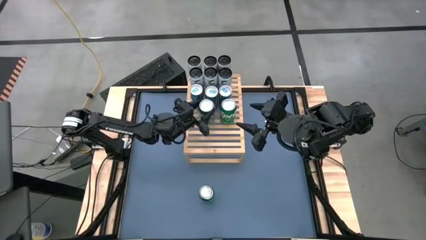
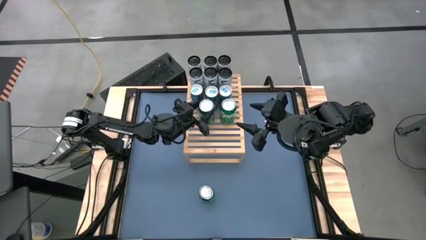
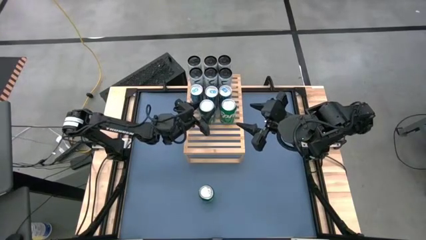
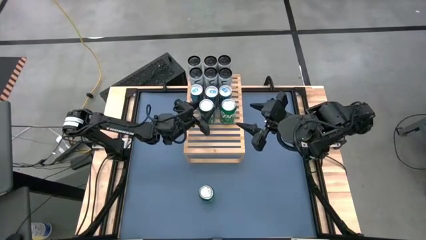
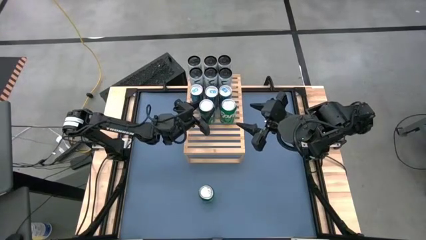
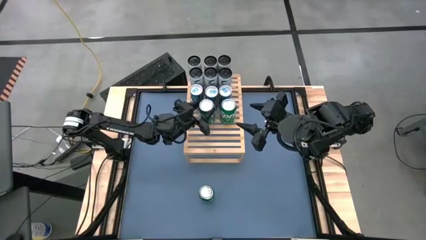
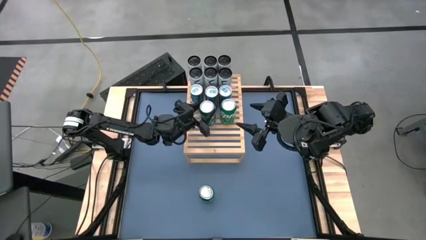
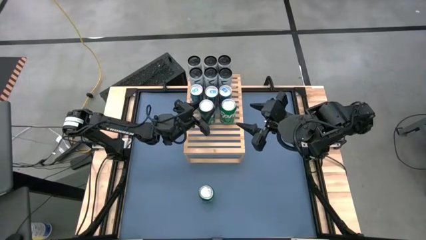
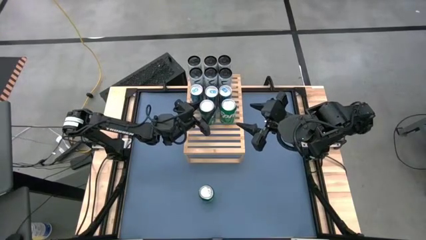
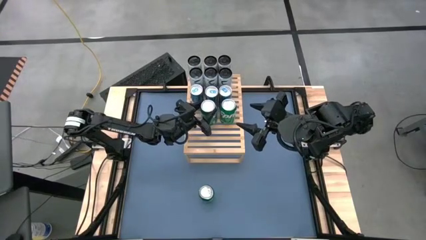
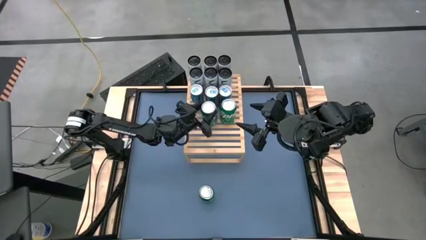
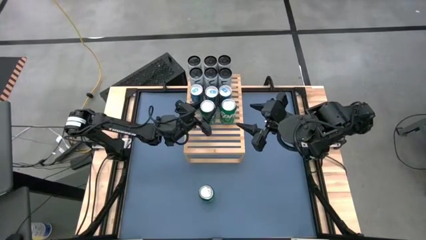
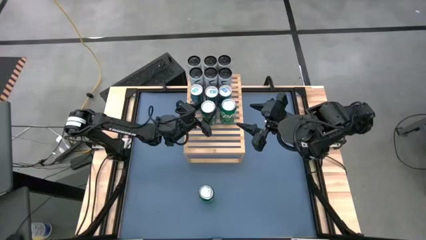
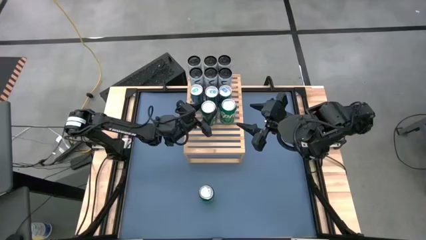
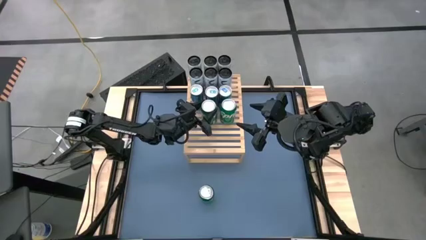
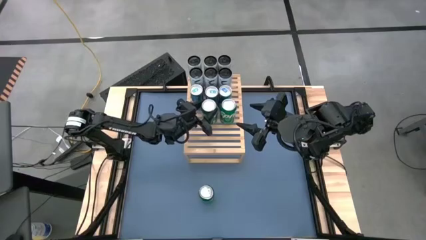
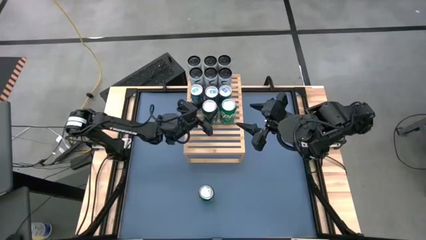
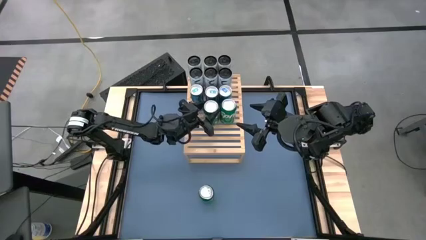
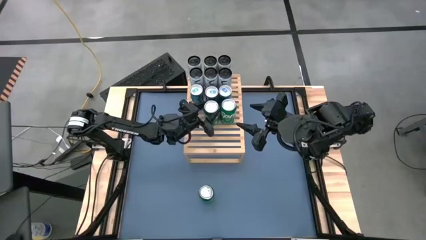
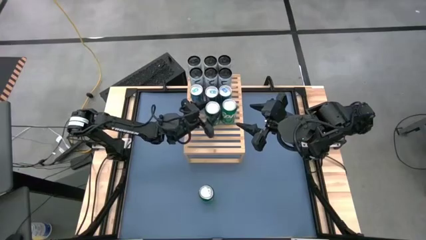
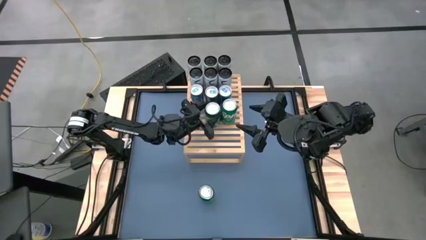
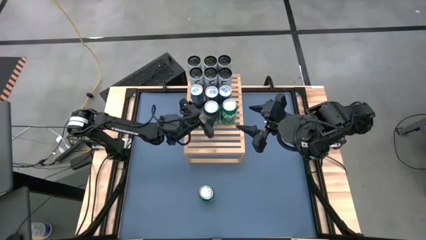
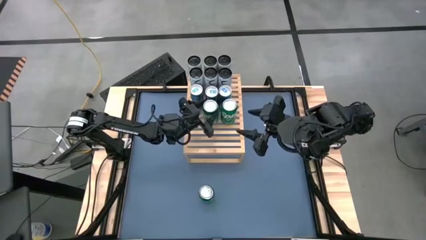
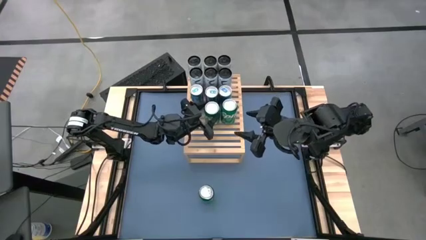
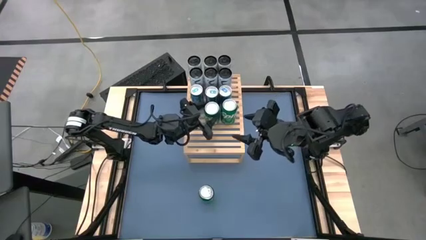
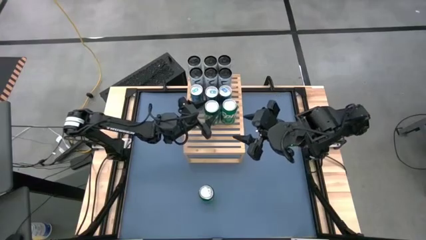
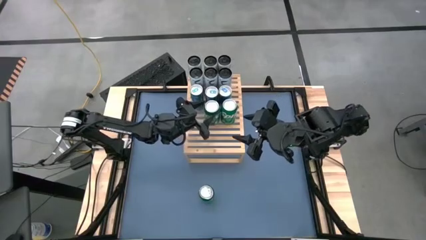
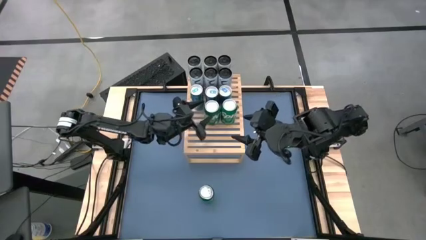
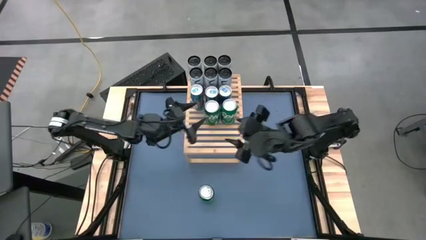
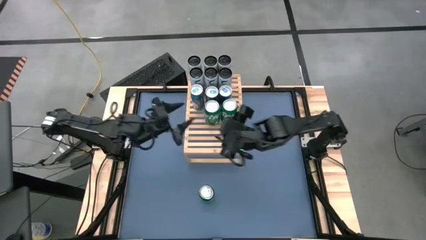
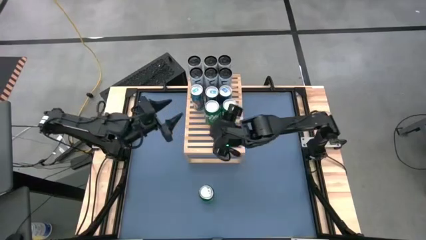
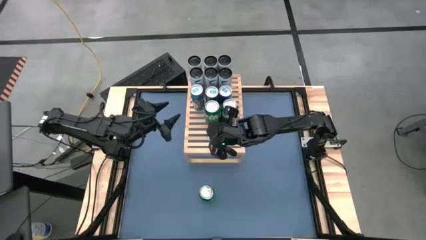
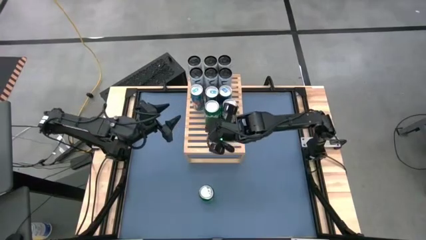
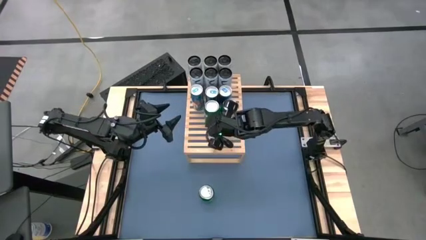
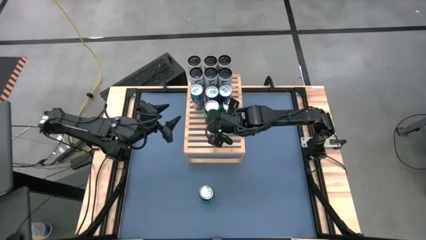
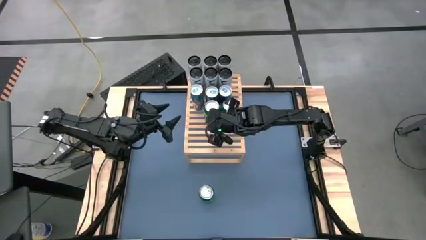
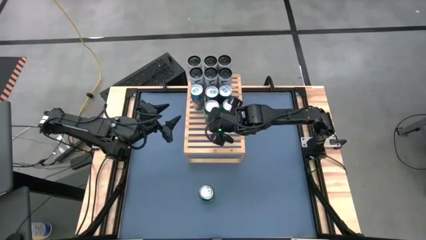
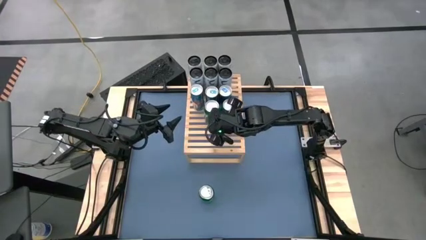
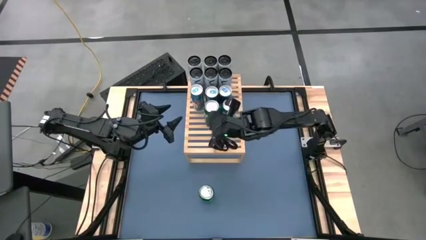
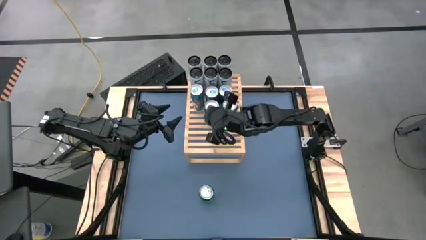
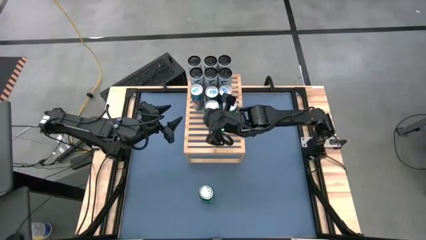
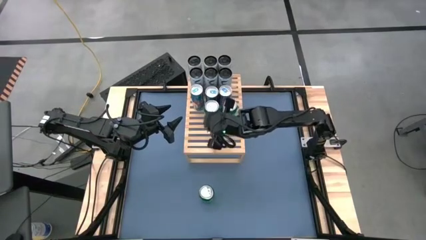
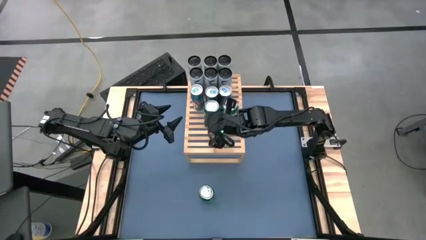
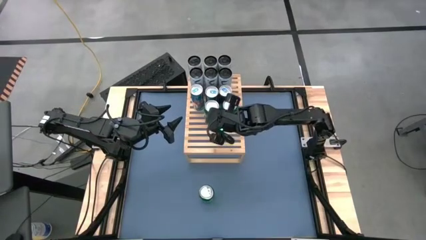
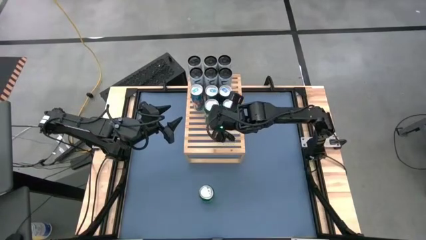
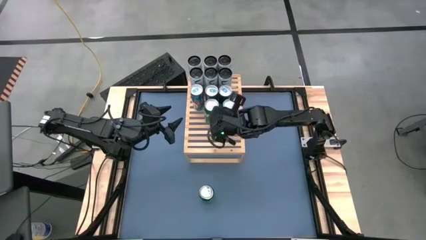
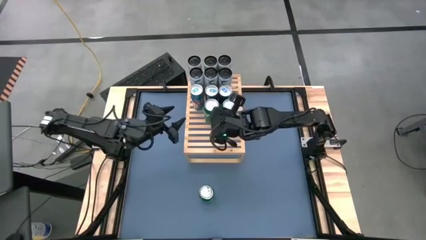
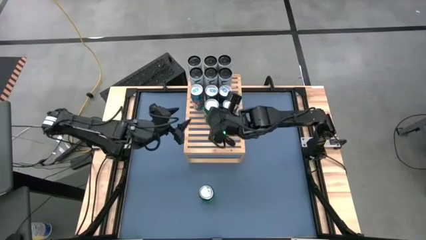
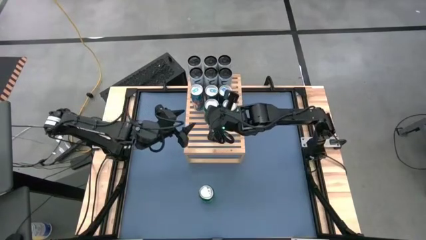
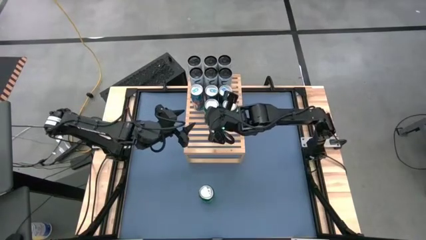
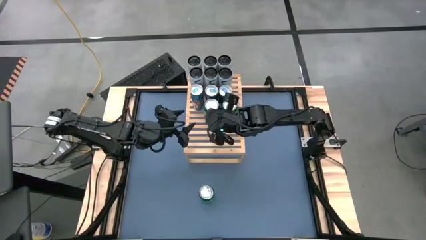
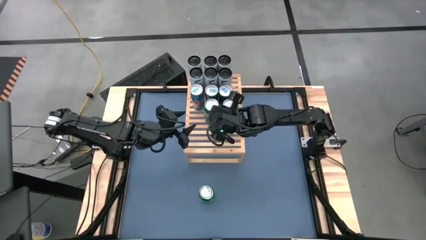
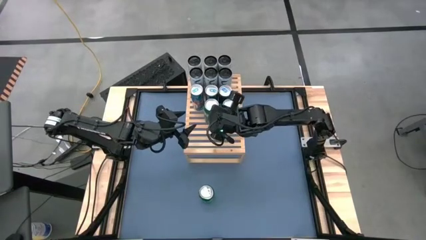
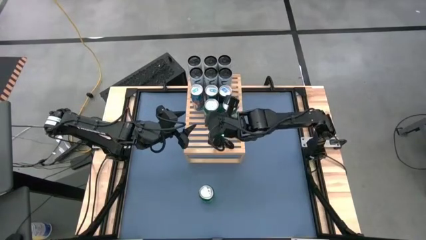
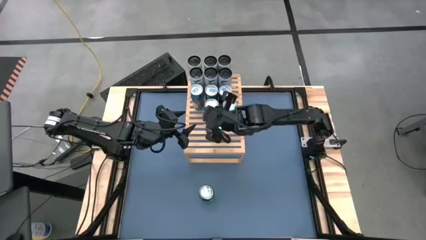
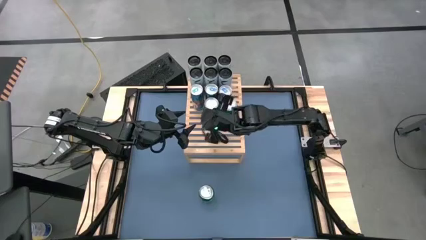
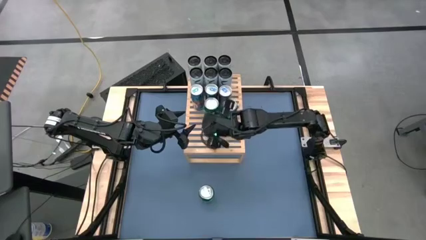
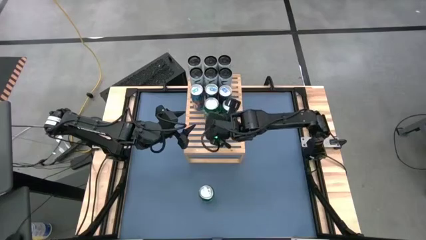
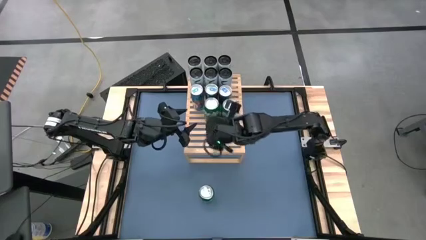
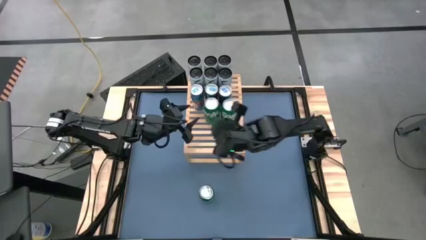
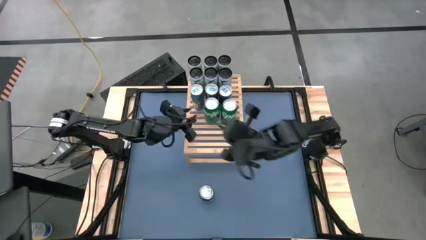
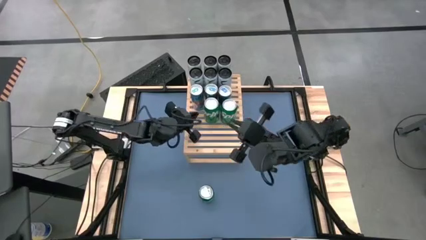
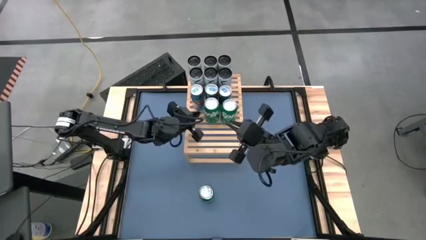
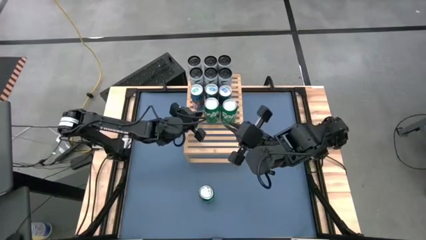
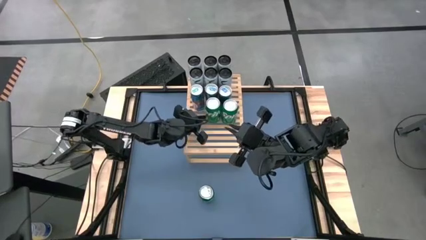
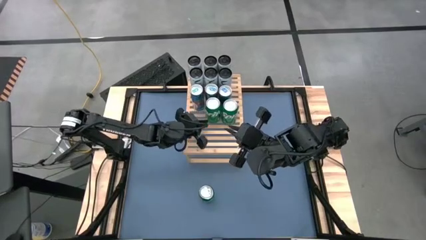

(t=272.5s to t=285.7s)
Task: Place canned beverage on shelf
Put the green soda can on the shelf aligned to the other green soda
